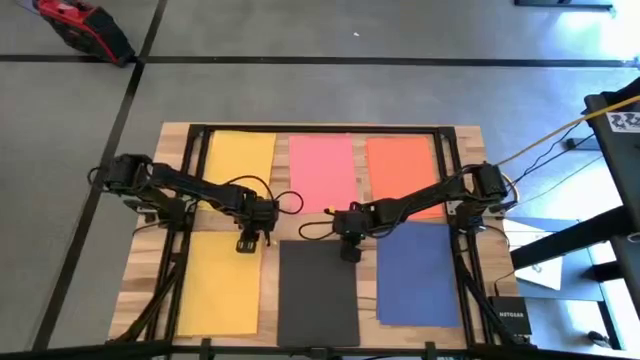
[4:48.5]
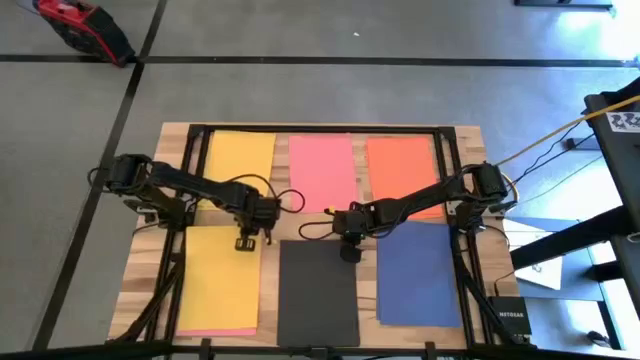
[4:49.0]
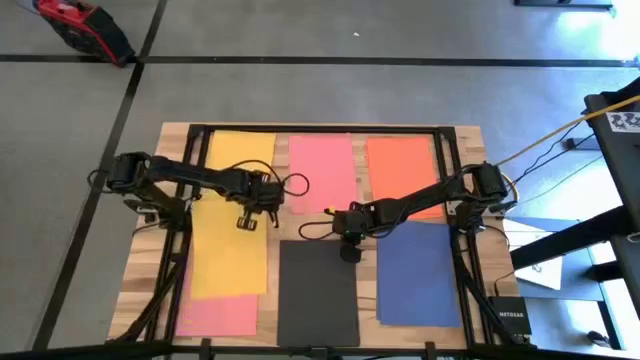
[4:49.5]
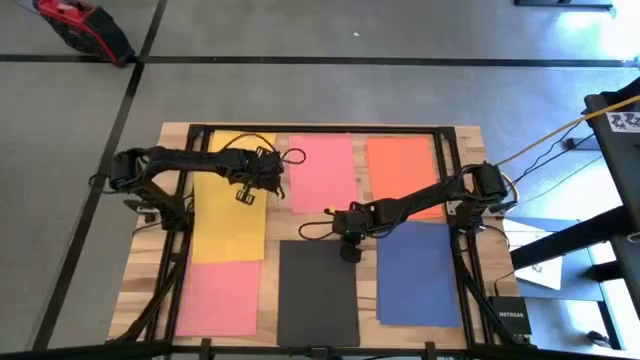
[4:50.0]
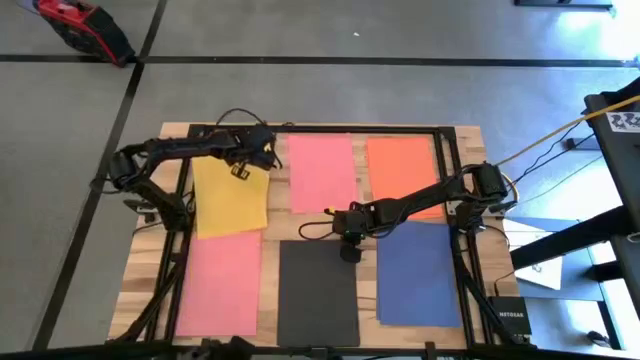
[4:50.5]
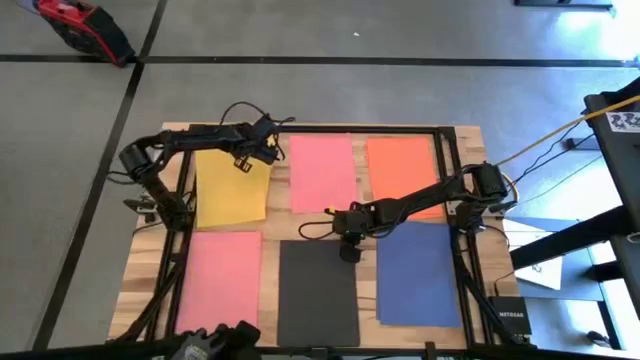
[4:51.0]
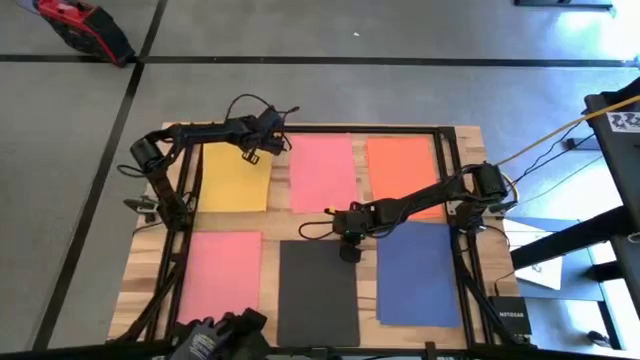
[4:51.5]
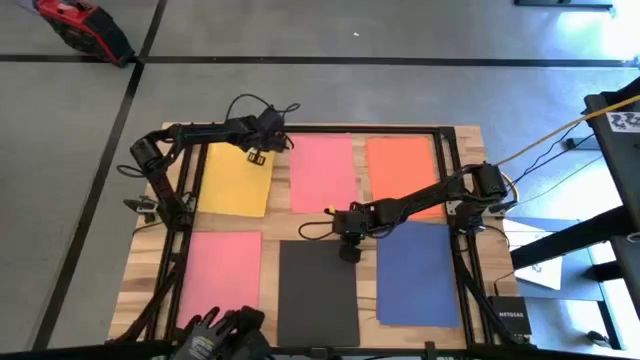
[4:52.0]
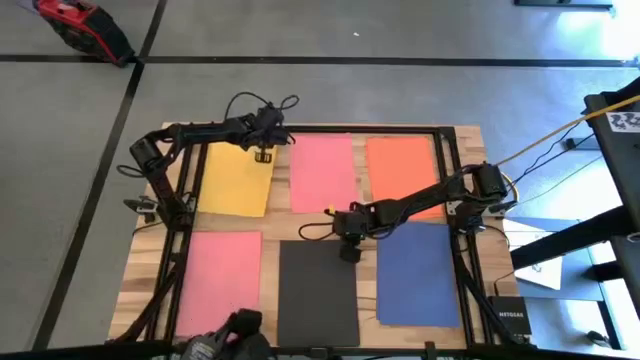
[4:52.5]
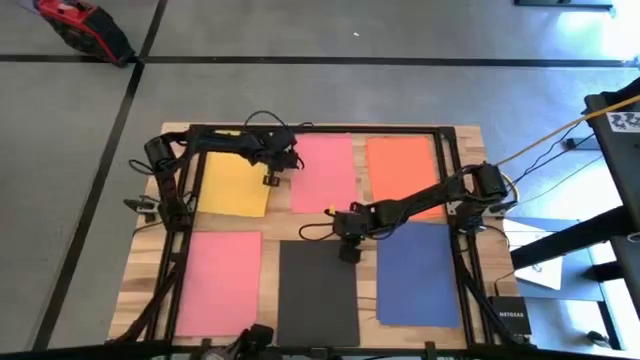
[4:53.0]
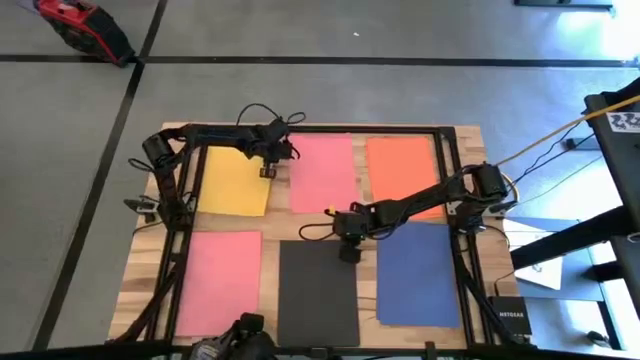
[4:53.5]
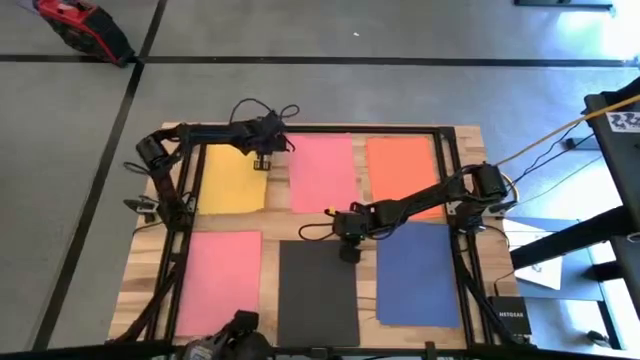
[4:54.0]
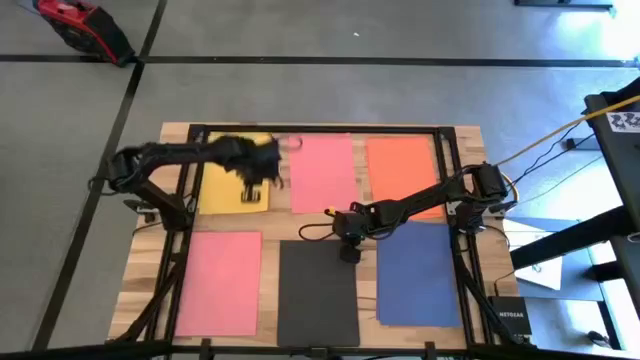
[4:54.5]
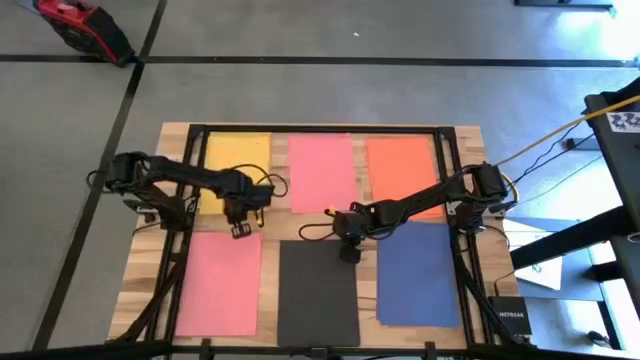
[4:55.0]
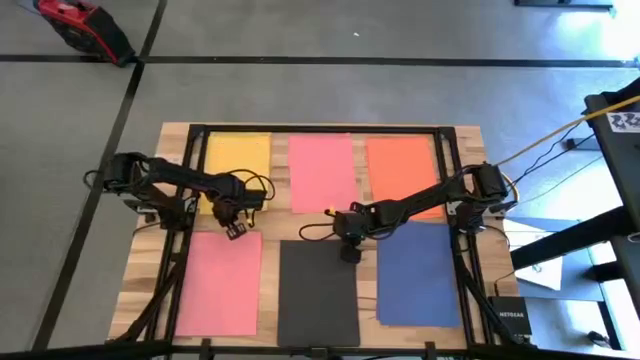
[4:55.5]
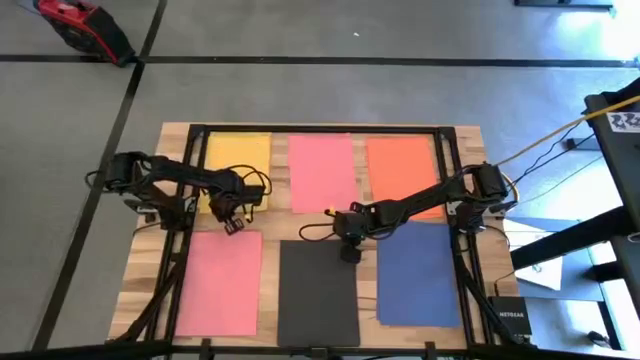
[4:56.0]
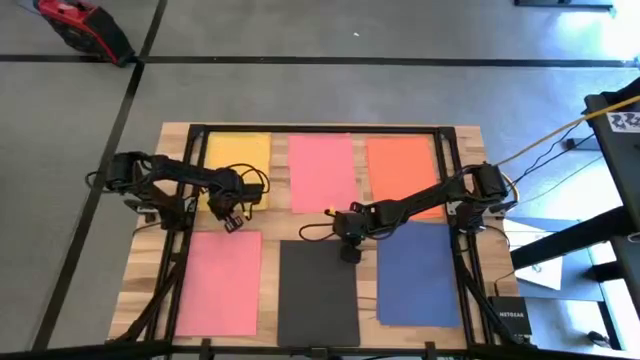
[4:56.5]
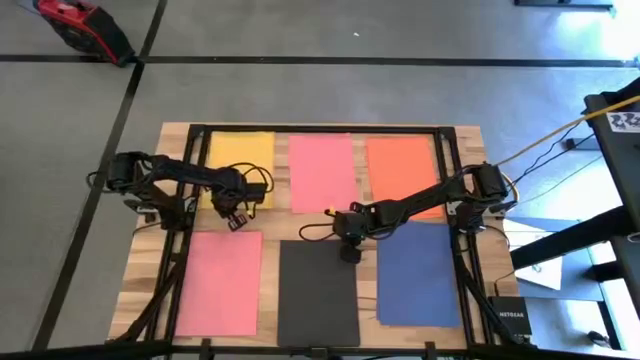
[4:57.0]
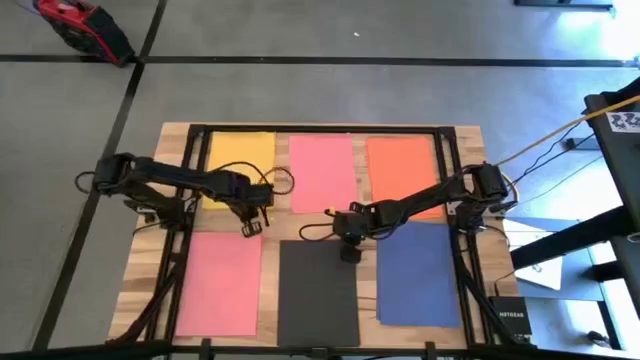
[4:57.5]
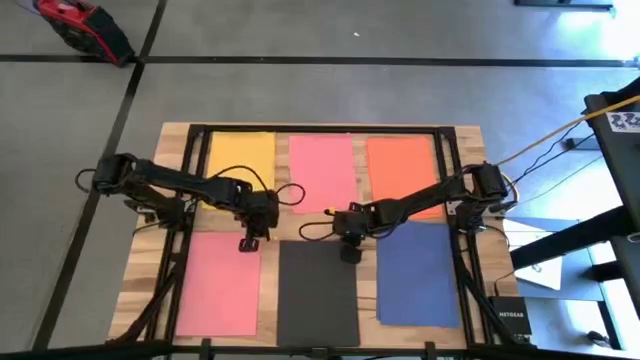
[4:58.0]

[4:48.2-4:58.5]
Task: Organize paper
Stack the yellow paper on the top of the yellow paper

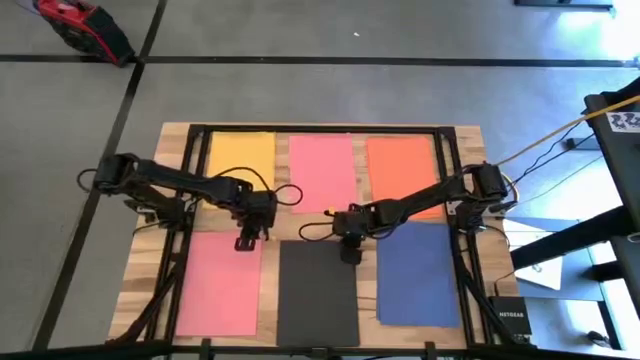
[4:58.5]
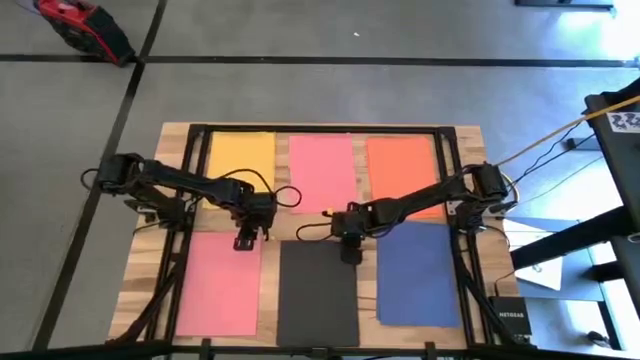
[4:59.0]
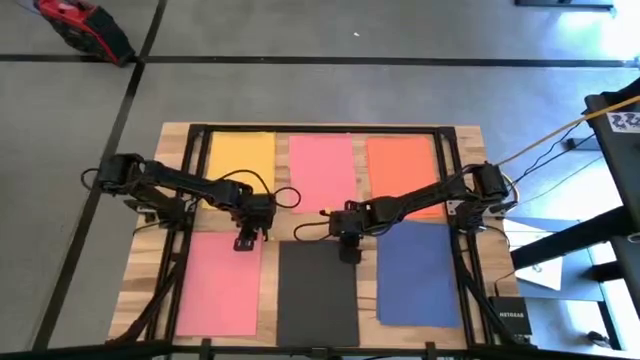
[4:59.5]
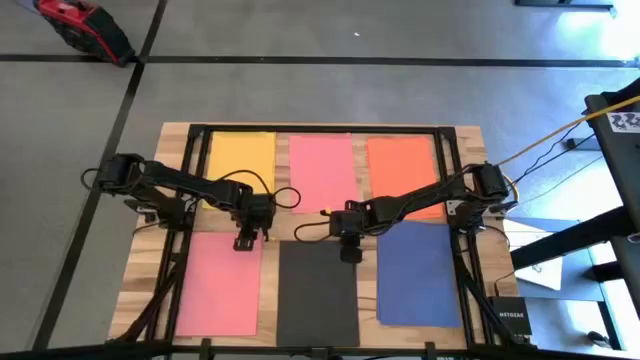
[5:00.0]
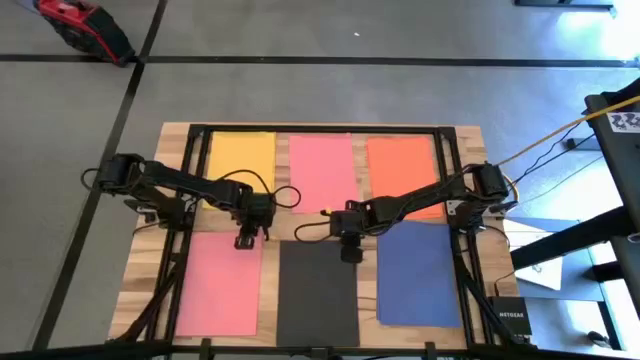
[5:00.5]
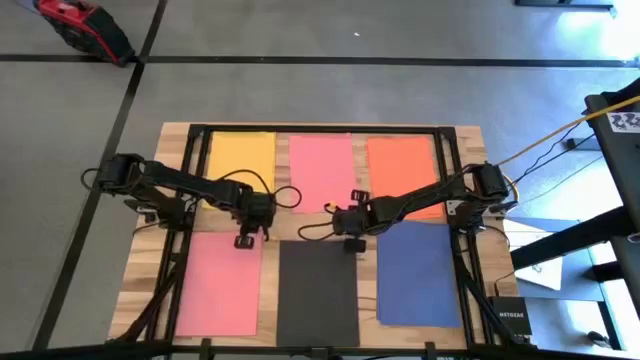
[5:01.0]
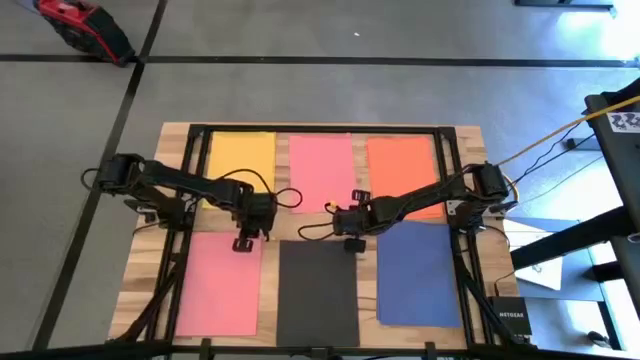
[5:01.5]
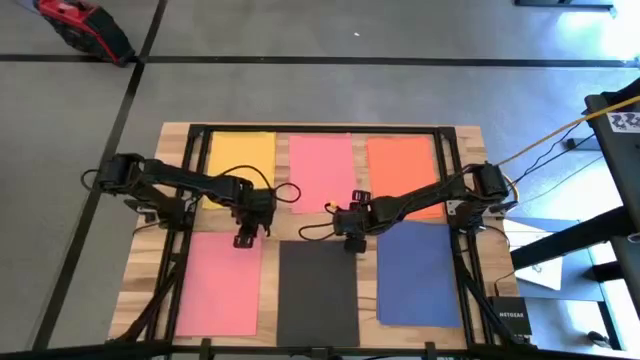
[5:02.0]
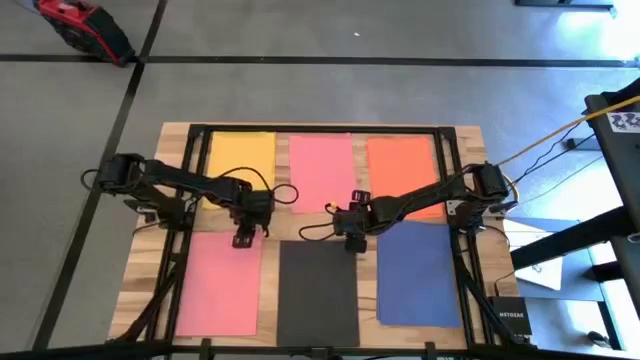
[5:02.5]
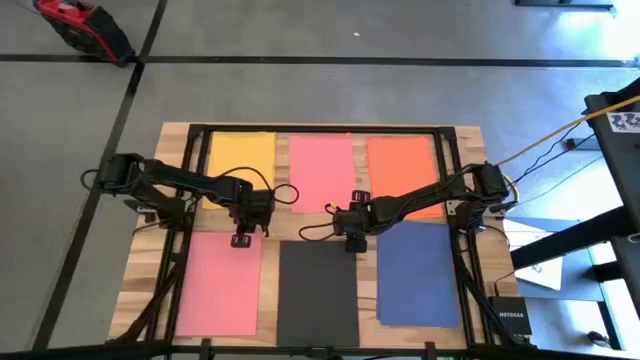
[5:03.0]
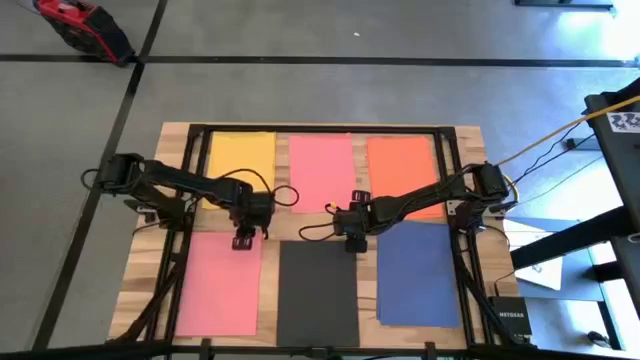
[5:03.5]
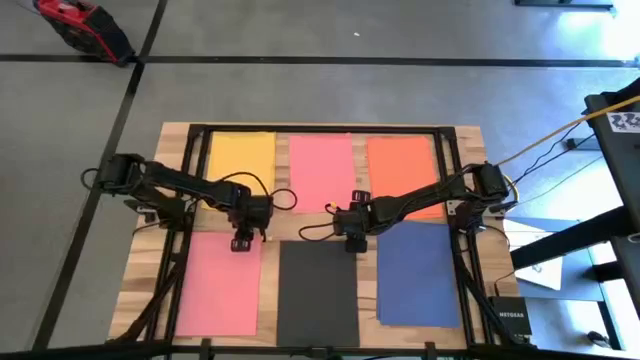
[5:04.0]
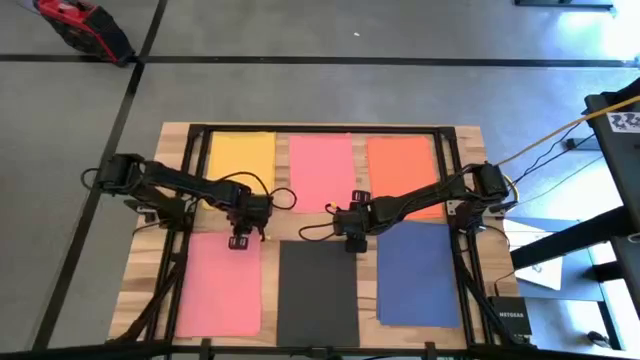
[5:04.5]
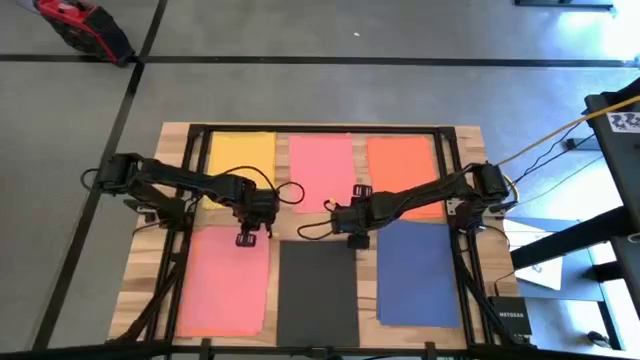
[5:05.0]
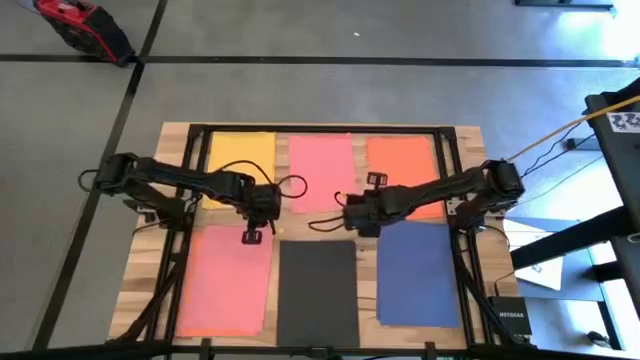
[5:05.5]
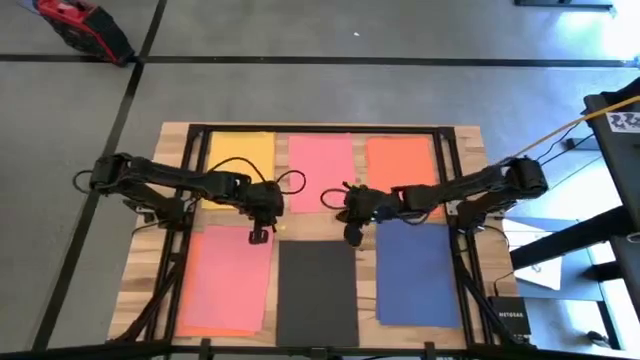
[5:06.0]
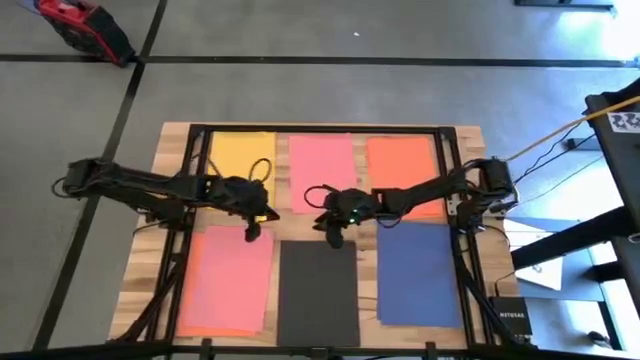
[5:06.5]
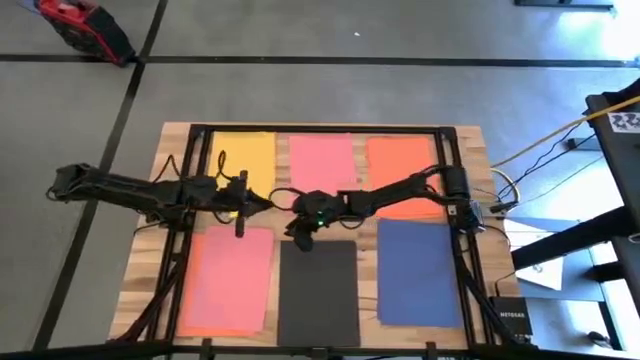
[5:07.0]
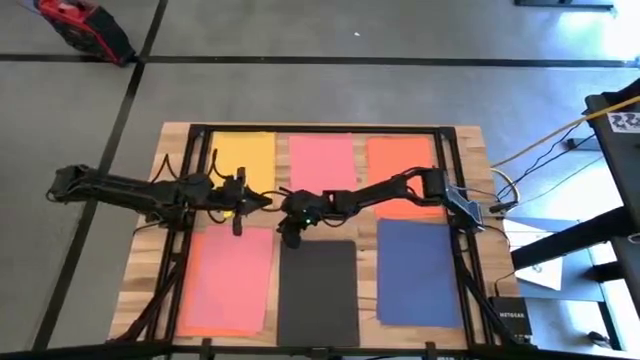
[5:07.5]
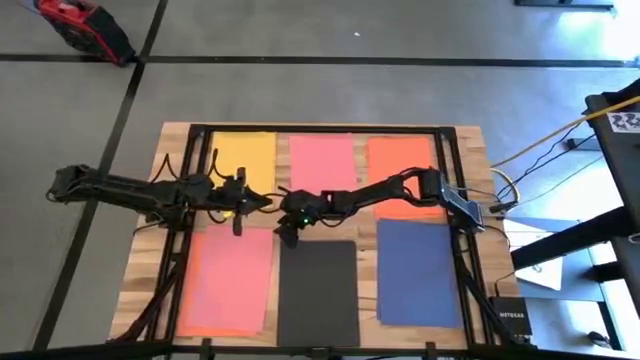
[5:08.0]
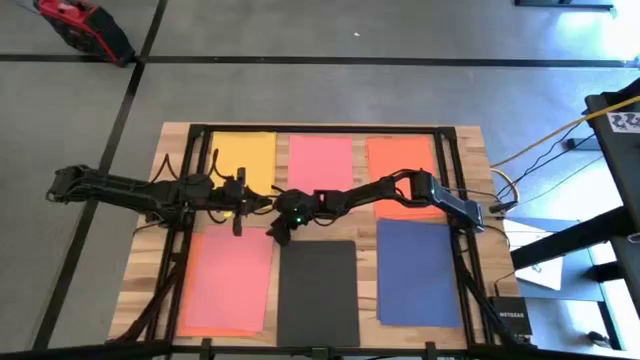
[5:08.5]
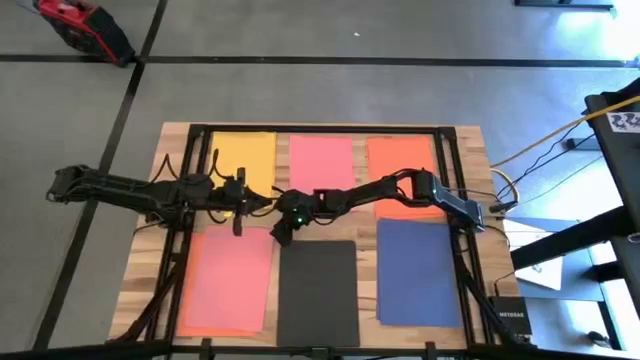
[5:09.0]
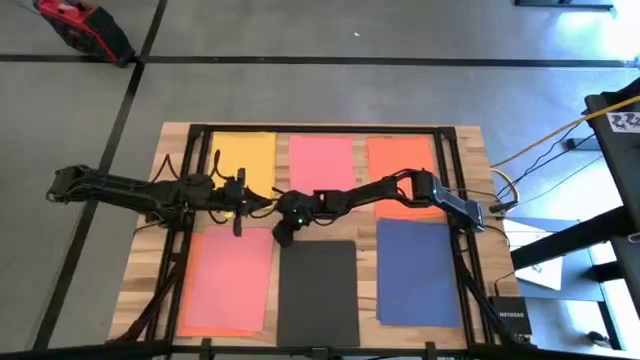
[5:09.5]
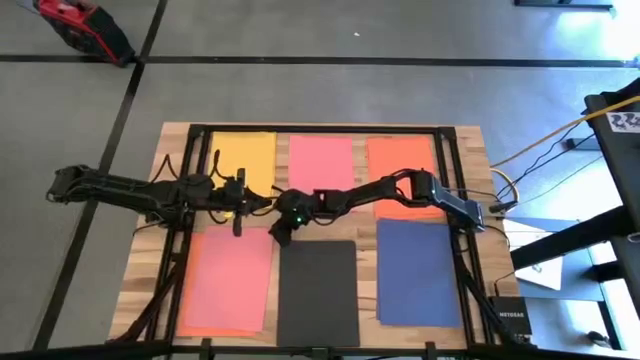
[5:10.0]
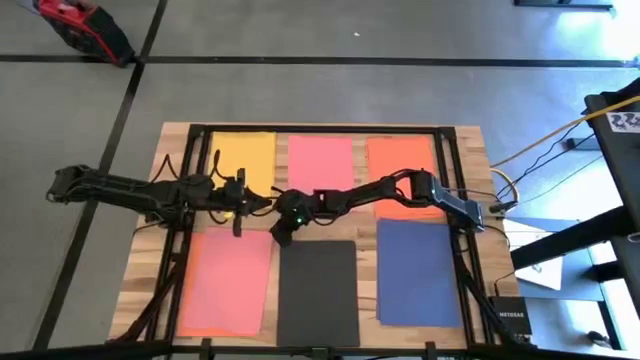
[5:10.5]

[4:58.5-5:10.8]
Stack the pink paper on top of the pink paper
